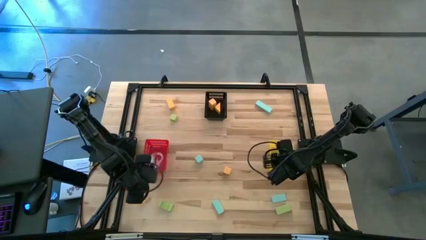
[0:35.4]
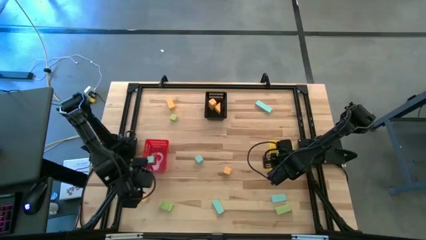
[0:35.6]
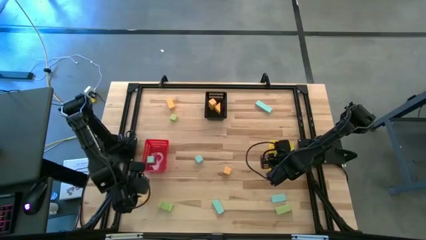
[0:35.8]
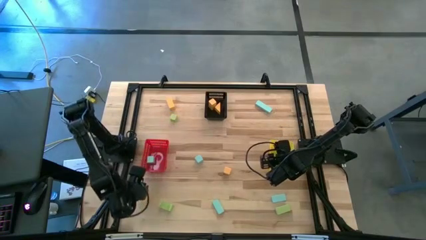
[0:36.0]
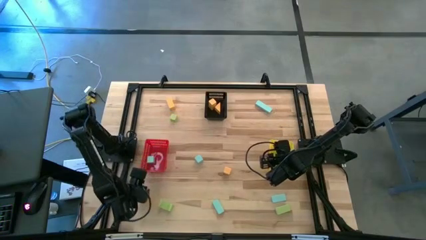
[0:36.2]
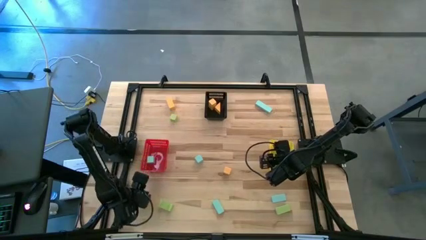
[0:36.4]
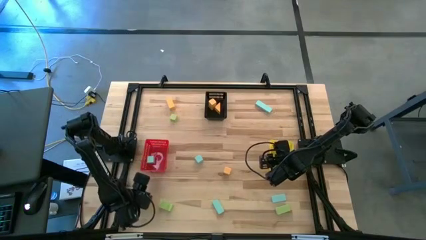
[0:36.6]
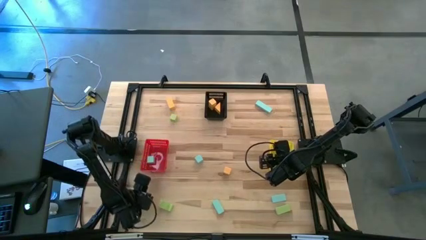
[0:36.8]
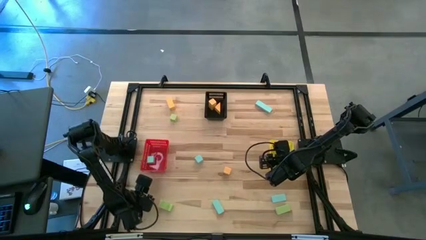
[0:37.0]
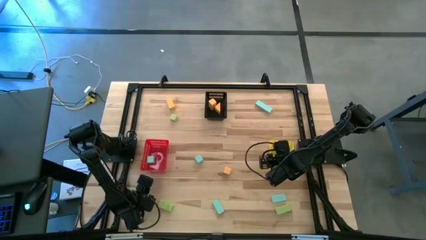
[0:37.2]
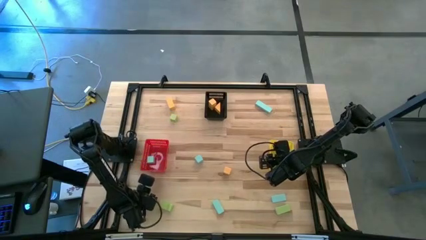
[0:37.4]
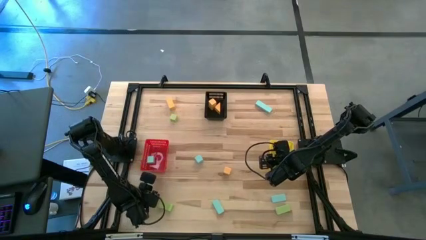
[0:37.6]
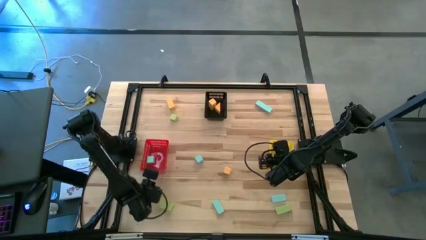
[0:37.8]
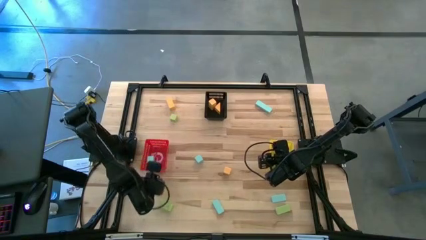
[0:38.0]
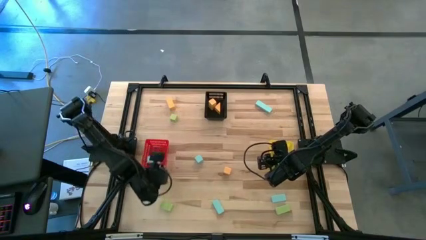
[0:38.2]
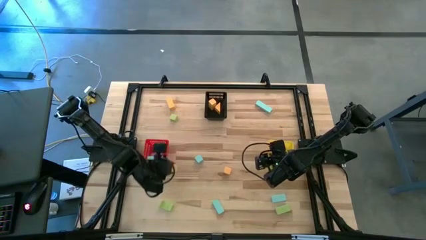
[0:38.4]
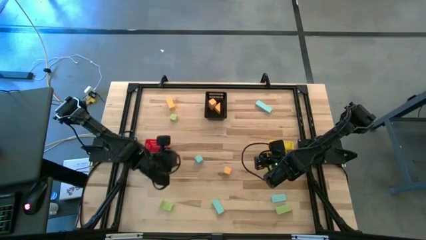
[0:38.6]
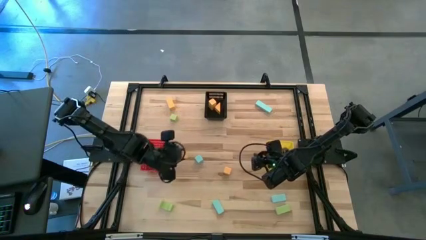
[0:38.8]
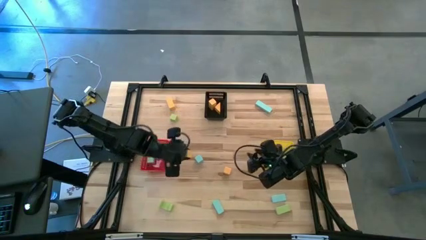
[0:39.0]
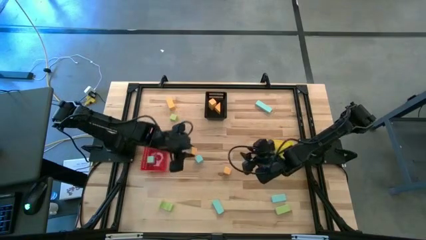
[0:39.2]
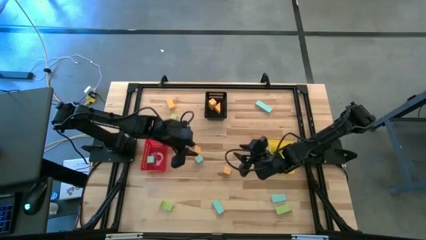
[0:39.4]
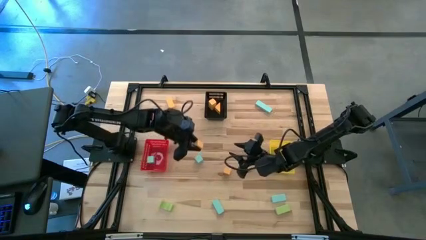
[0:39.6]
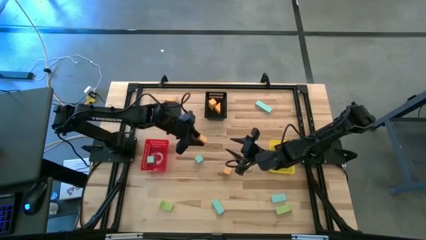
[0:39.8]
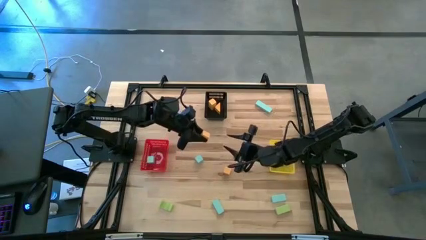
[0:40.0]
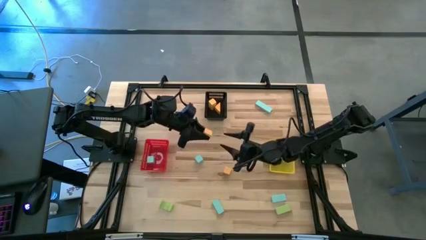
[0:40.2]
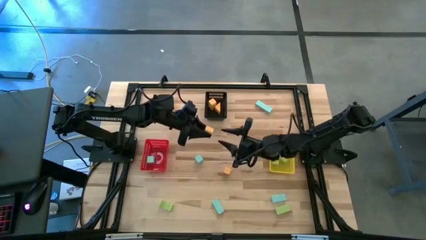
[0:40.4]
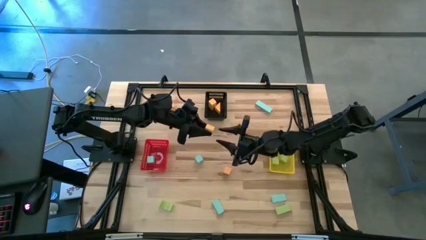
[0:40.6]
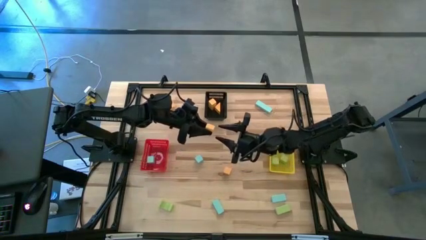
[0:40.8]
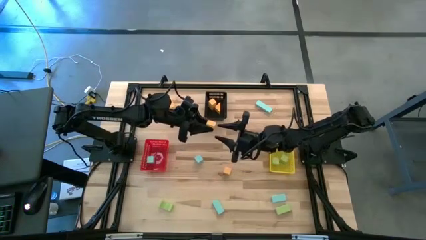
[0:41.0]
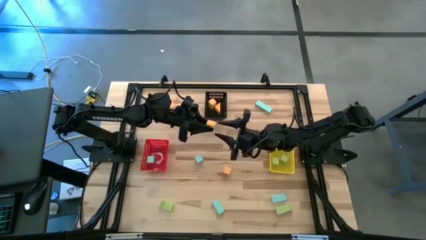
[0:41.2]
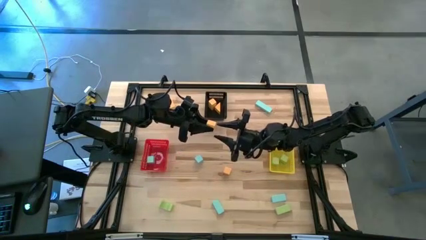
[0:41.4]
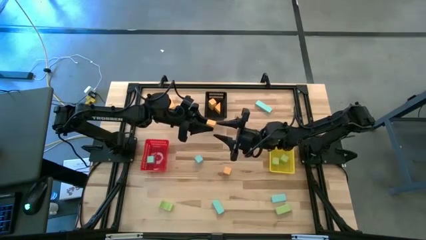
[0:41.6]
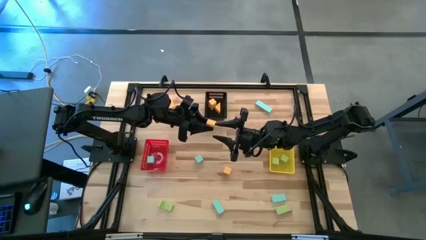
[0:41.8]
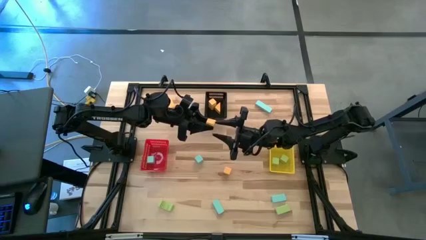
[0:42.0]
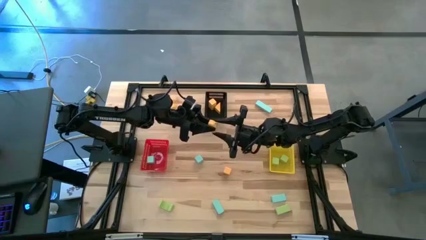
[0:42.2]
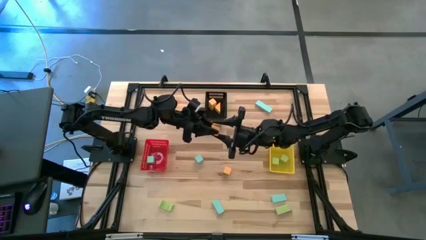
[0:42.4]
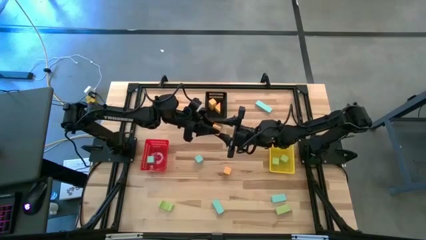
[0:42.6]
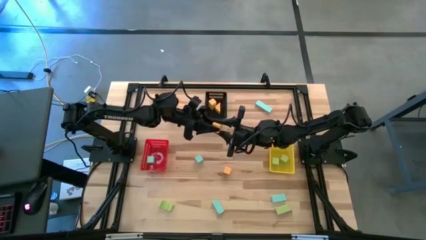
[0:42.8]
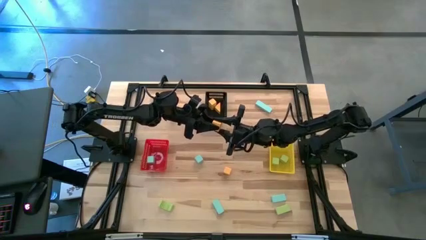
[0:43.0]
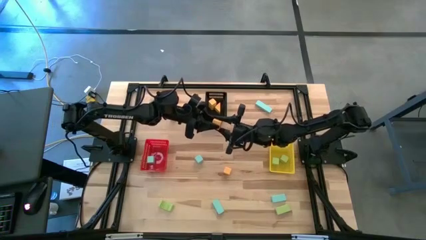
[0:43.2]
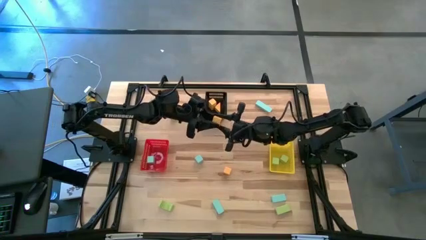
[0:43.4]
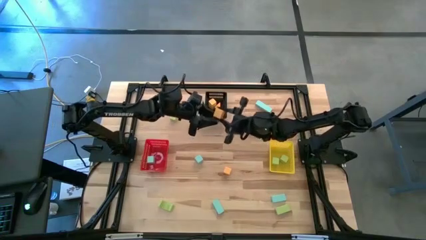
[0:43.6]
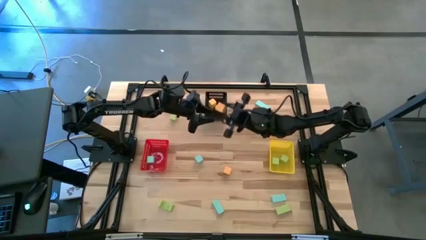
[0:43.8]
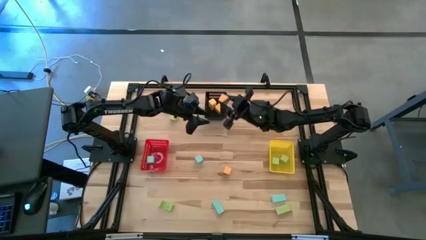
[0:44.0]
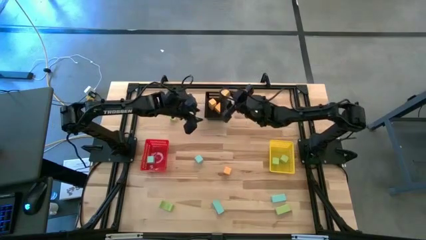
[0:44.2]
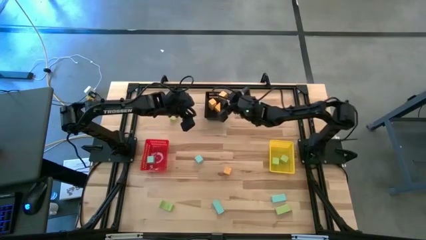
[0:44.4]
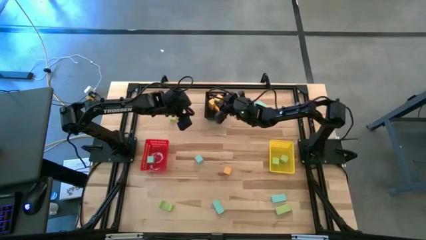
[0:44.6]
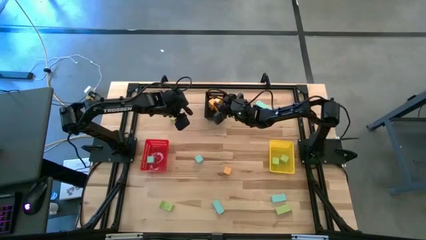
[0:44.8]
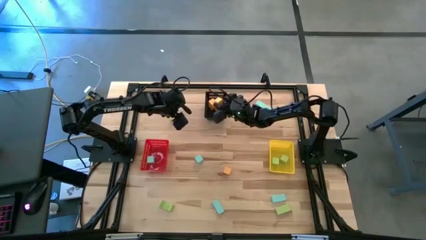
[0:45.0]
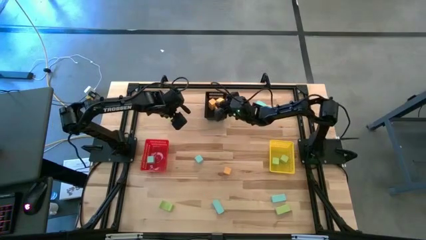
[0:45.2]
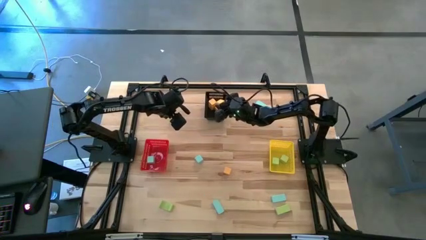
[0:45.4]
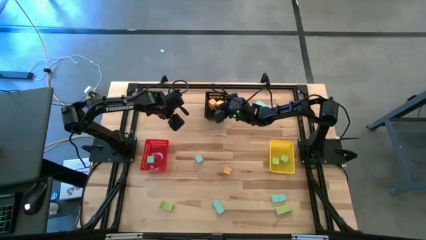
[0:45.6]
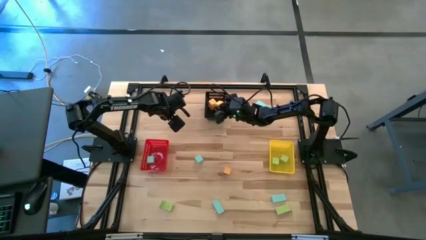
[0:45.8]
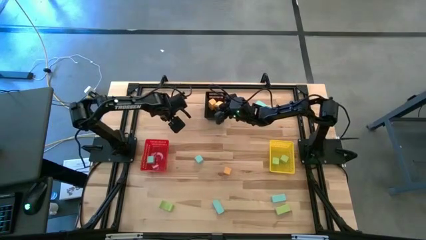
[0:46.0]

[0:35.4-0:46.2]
Task: Sort & place blocks by color
Put the yellow block into the black bin

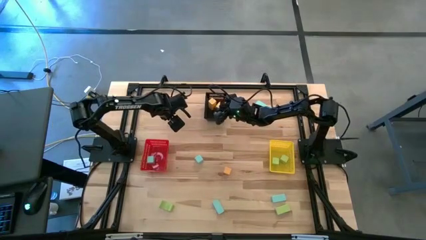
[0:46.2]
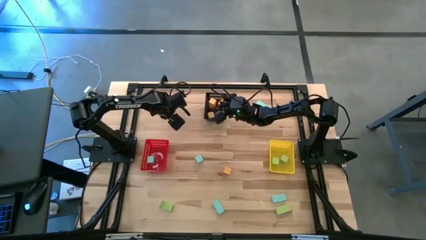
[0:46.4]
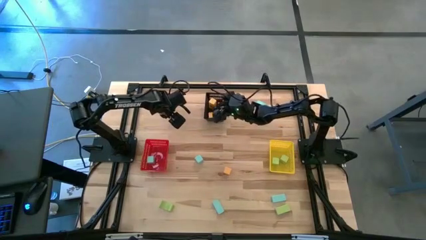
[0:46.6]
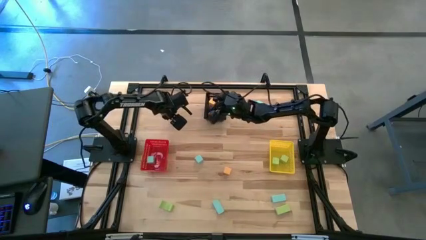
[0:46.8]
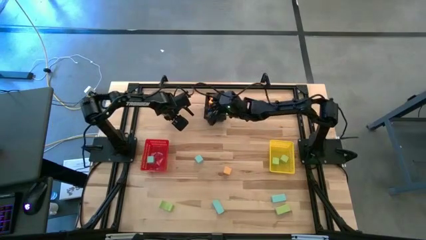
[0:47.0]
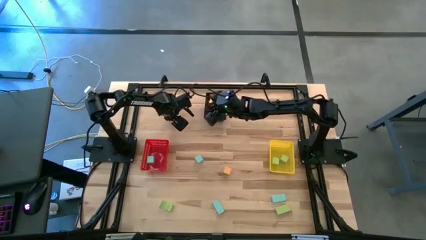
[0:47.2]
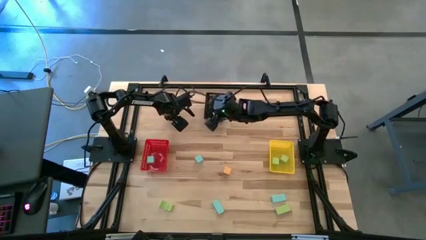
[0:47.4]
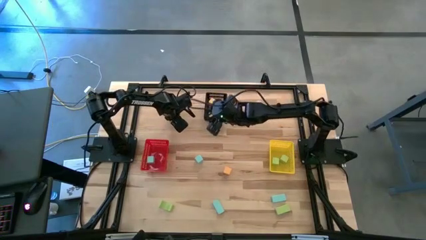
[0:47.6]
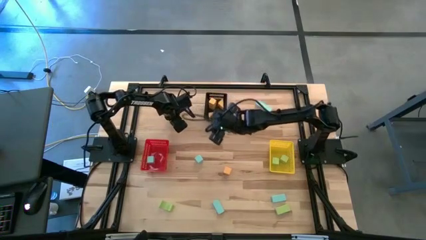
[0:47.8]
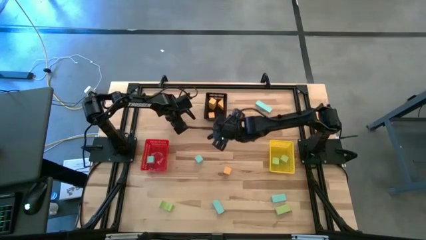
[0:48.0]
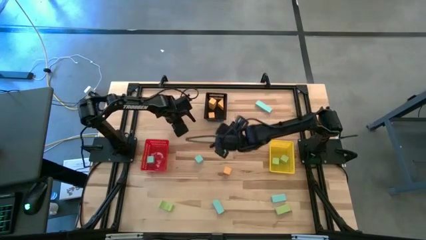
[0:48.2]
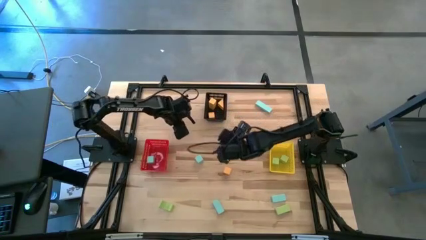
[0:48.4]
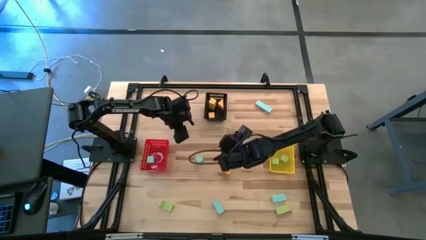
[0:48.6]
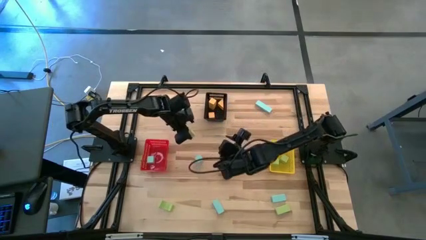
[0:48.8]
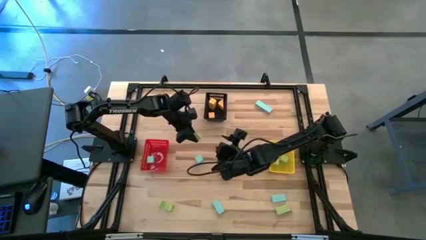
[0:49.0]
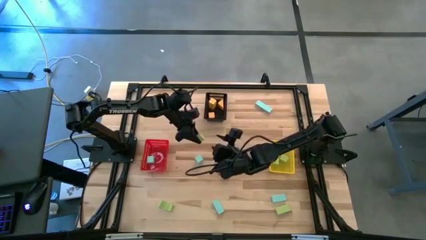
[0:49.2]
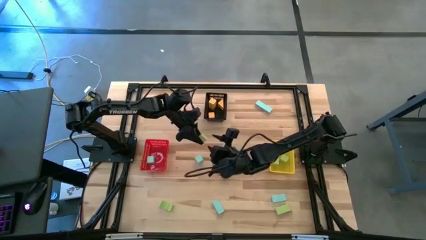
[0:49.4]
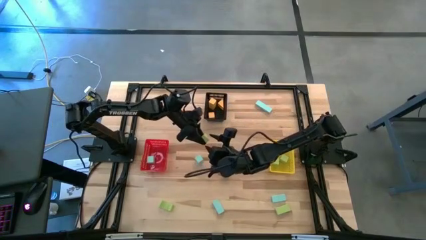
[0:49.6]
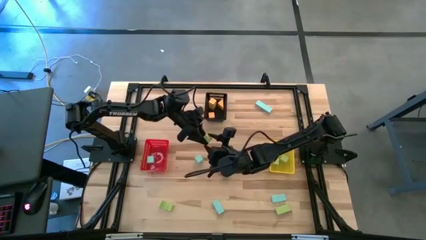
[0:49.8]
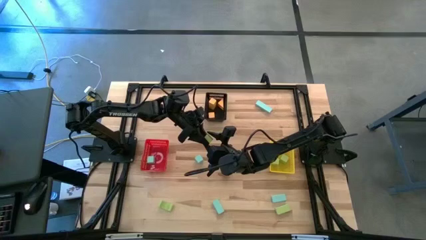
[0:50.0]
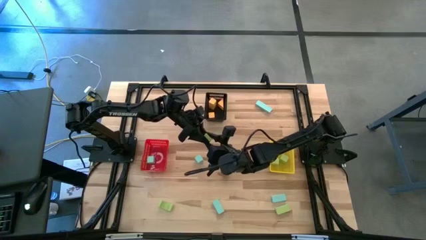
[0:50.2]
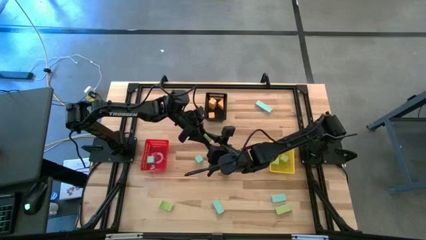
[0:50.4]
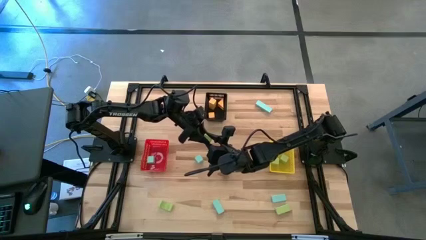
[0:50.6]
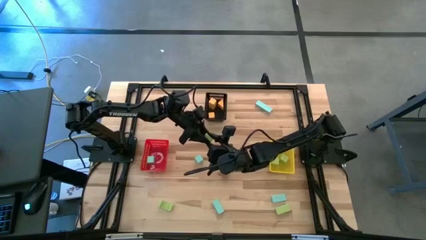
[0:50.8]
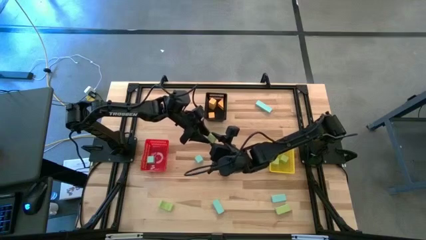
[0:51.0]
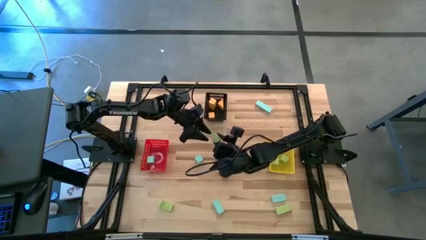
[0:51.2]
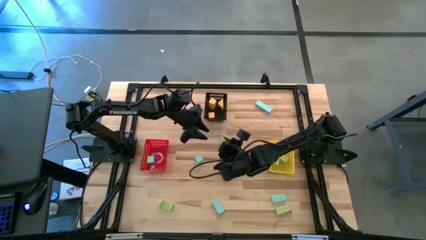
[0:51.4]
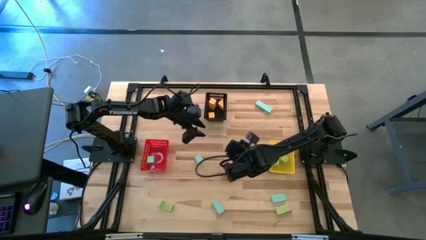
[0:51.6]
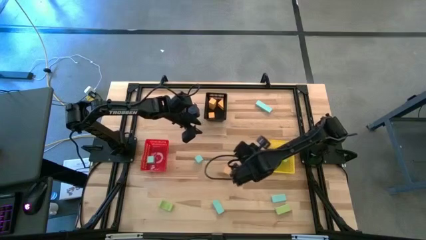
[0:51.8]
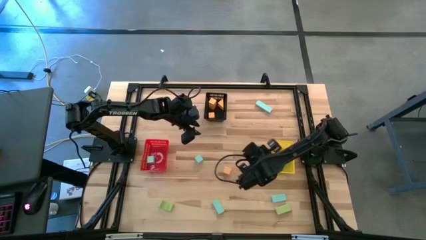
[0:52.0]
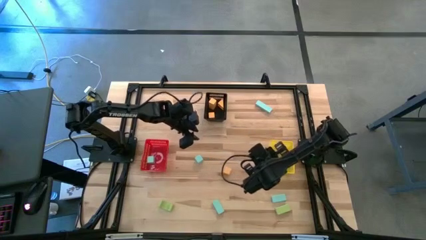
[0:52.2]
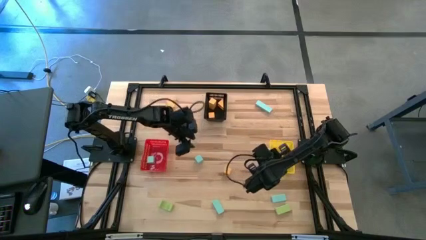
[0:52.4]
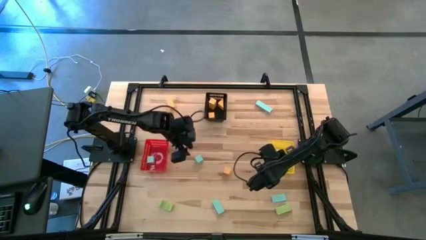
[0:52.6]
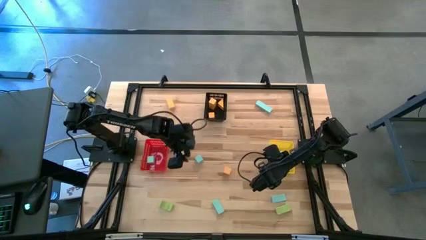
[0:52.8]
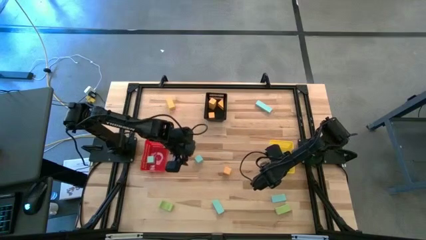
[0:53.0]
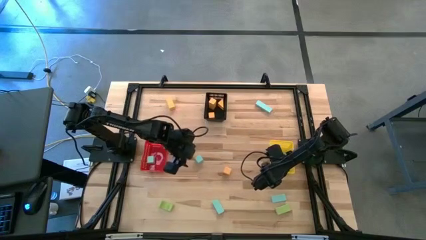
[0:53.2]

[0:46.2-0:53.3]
Put the green block into the yellow bin
